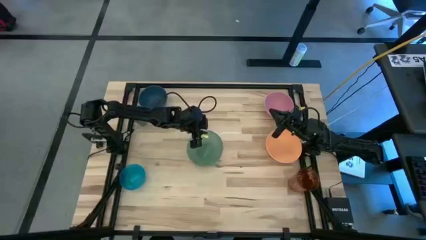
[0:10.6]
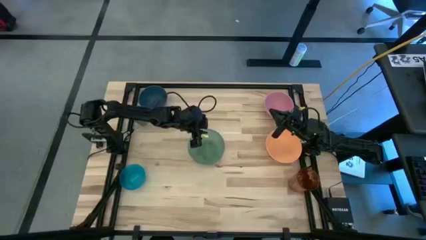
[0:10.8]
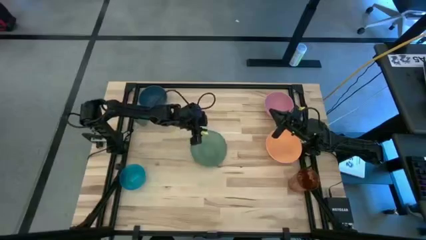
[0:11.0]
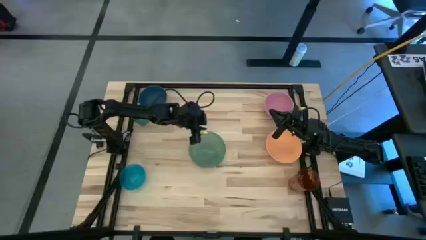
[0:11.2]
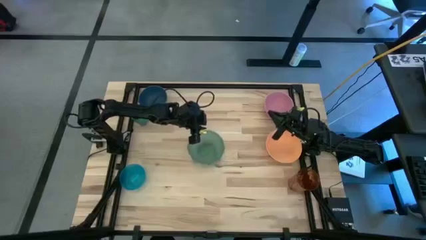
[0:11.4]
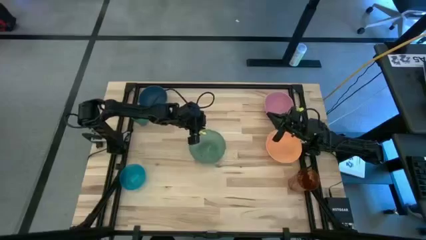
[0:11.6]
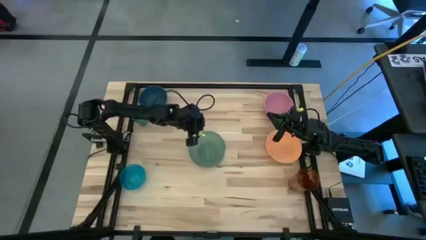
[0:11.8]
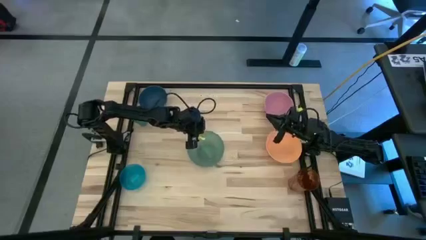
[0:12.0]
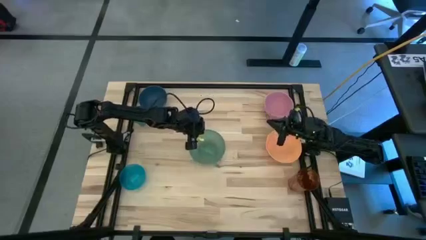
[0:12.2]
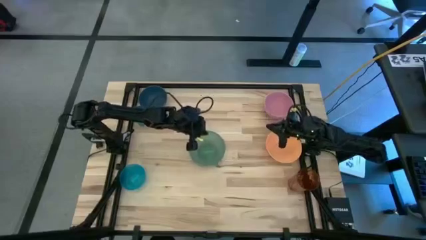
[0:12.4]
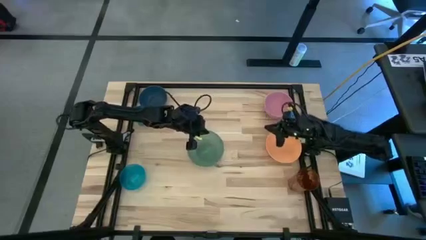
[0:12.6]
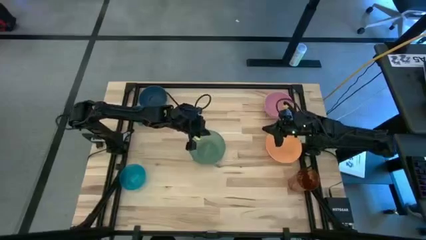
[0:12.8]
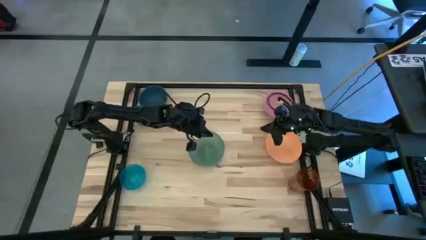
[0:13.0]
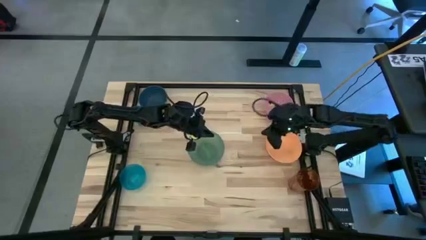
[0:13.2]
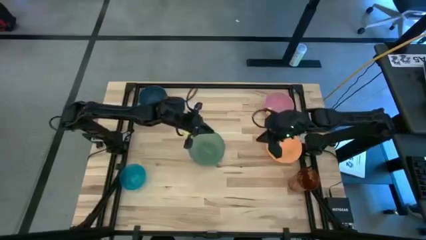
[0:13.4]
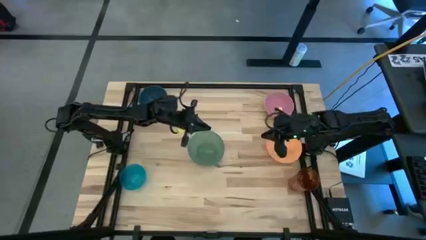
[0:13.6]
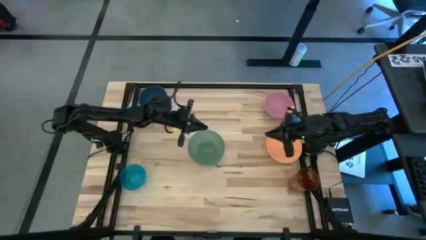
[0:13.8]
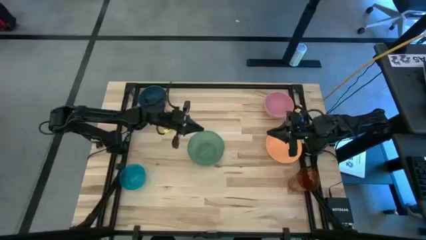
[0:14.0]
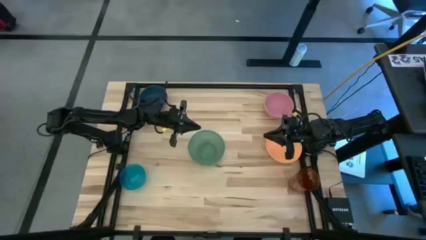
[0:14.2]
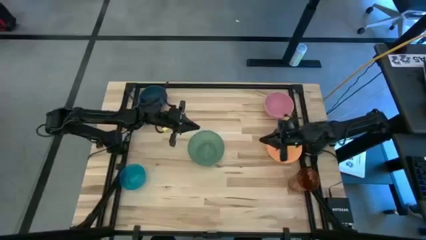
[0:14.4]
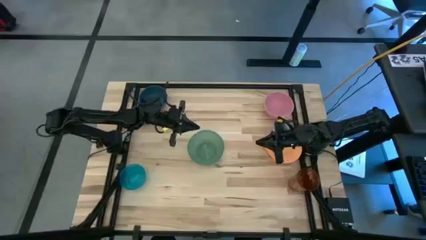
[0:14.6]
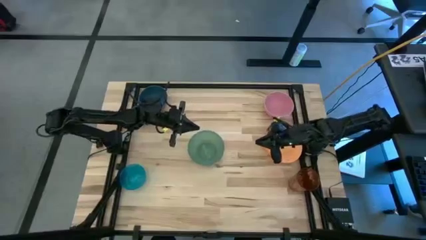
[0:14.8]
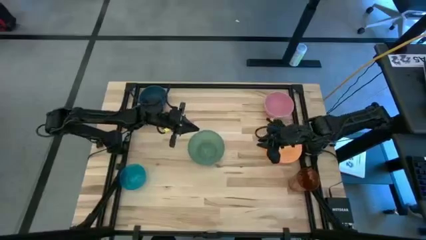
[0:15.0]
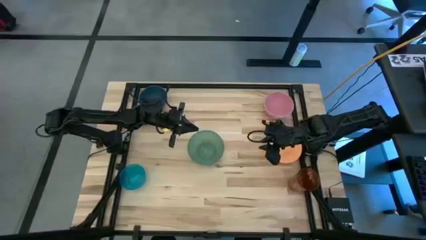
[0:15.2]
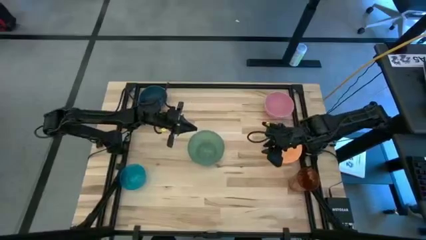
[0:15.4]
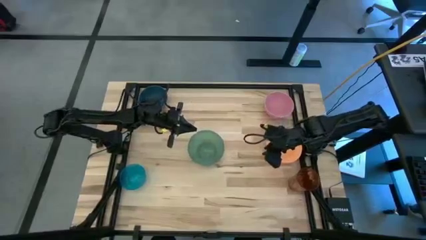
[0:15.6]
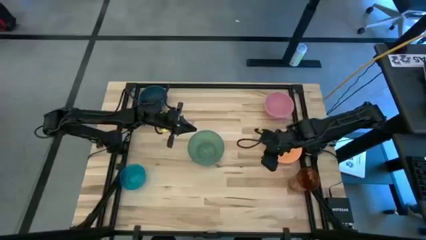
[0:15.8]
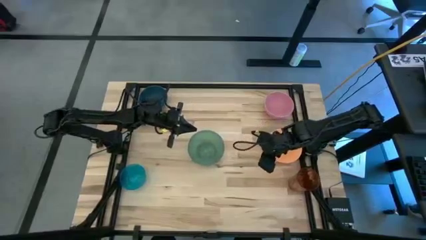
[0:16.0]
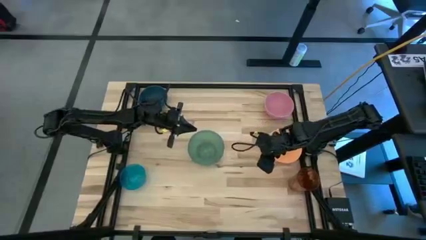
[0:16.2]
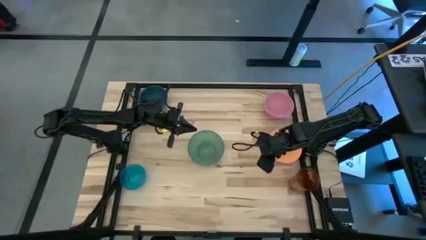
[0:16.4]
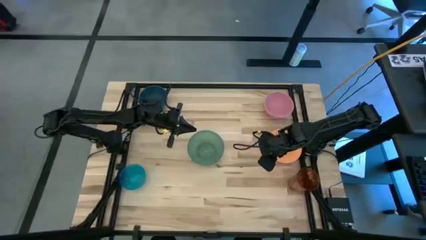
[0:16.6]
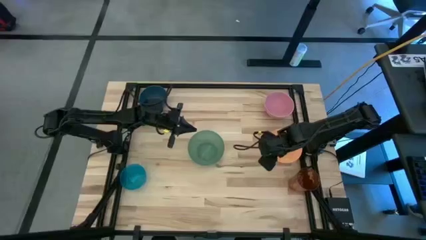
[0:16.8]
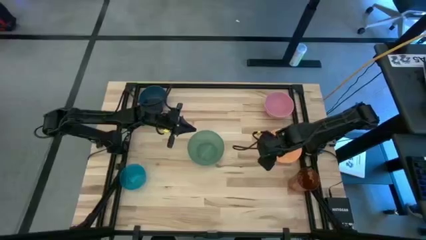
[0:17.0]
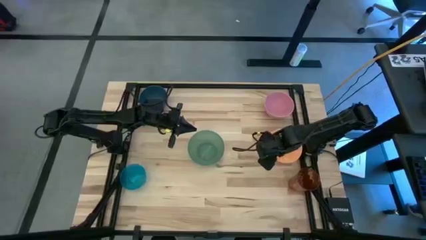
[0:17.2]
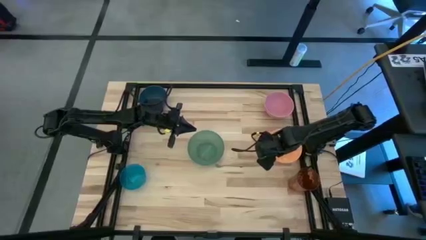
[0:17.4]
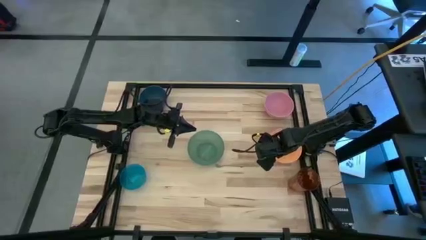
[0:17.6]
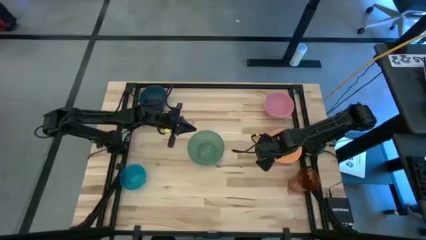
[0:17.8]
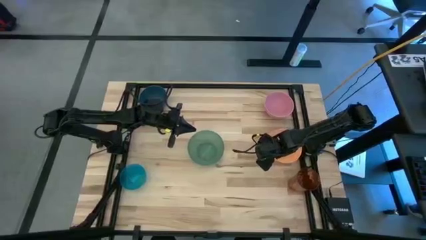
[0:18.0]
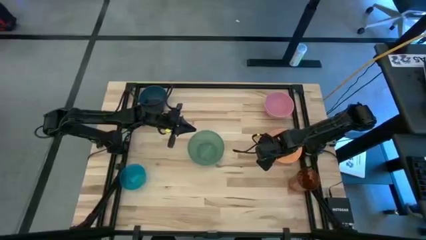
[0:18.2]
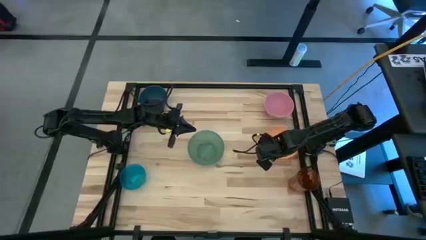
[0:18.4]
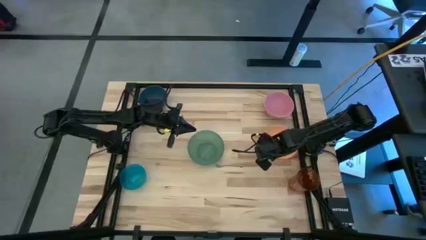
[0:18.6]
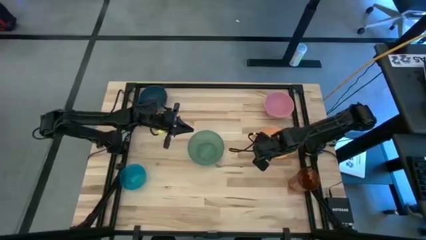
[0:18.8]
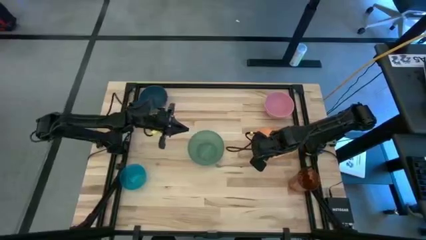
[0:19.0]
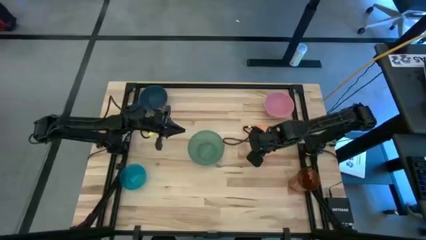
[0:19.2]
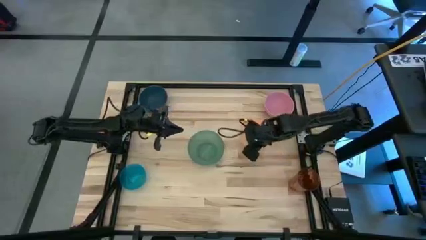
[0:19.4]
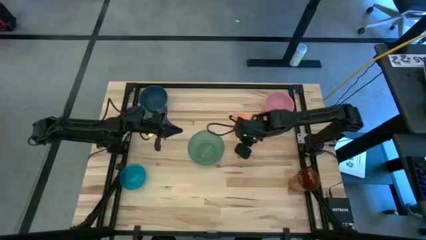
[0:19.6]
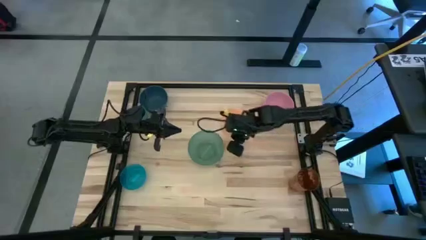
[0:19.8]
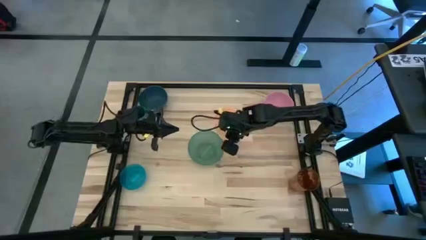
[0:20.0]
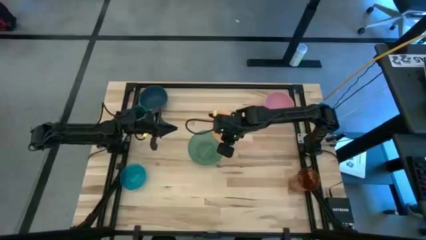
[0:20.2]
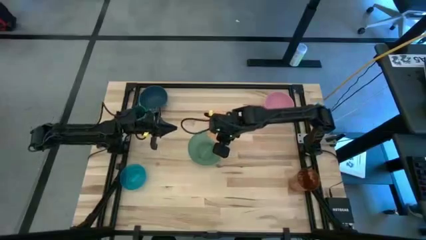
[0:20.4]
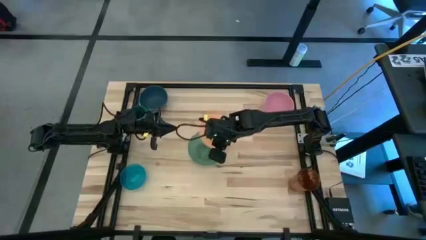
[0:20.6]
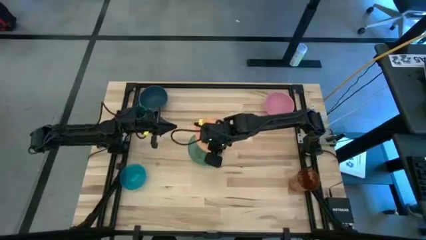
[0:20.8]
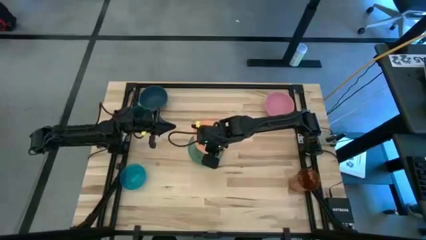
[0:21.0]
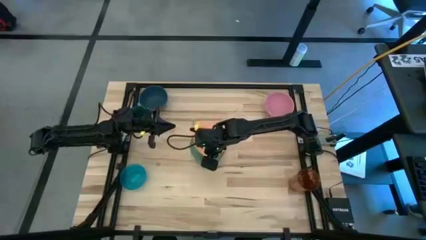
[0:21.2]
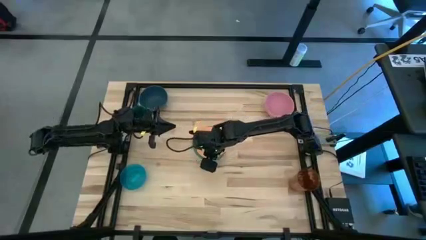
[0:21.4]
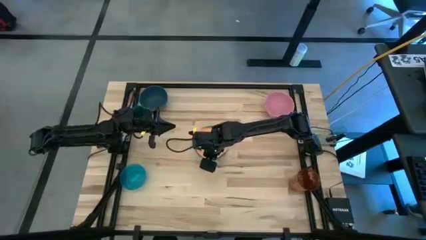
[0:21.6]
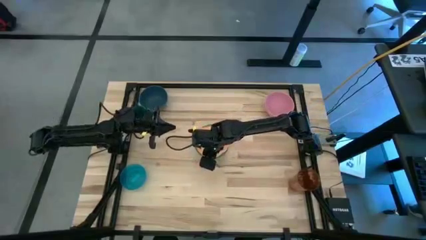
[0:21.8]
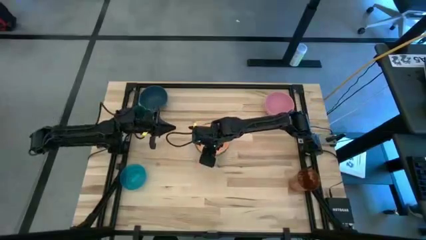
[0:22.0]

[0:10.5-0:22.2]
Stack the orange bowl on top of the green bowl
